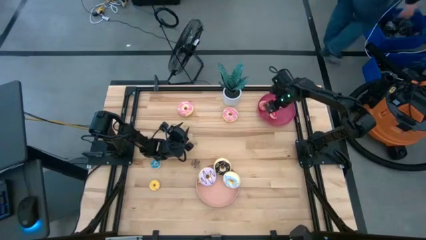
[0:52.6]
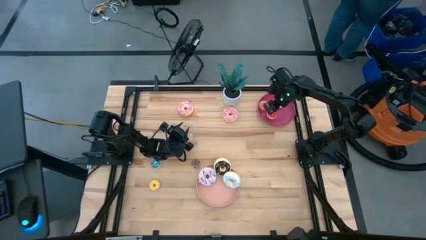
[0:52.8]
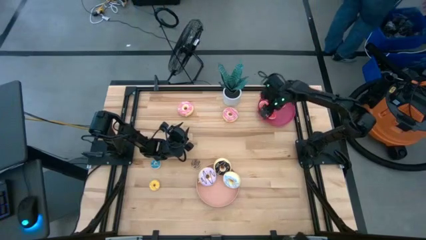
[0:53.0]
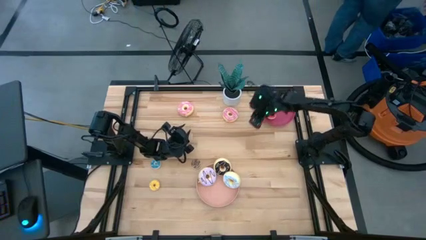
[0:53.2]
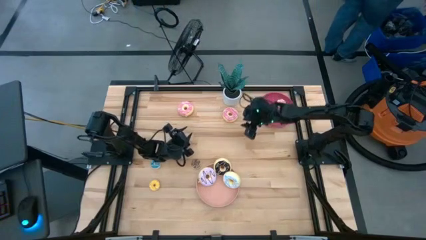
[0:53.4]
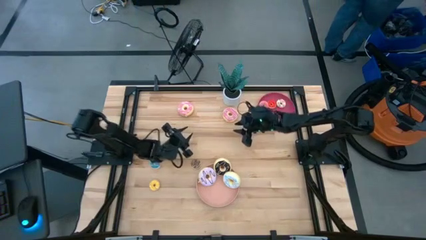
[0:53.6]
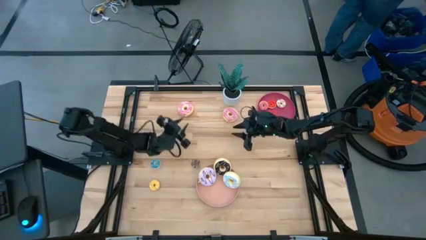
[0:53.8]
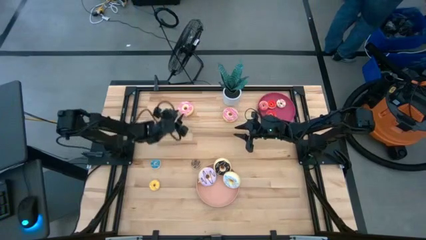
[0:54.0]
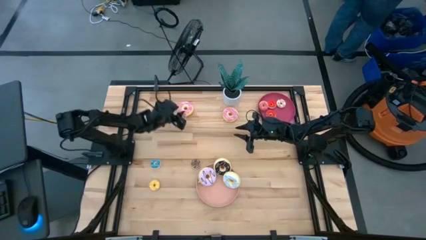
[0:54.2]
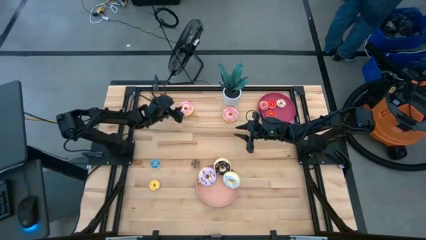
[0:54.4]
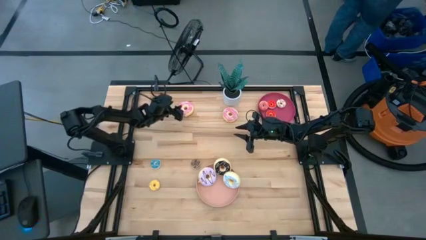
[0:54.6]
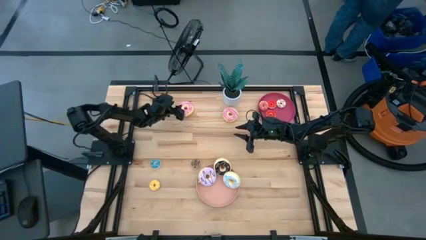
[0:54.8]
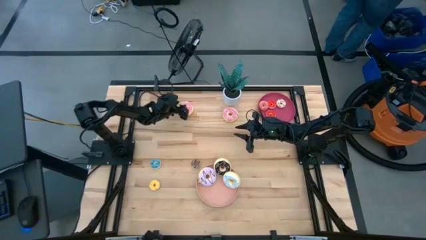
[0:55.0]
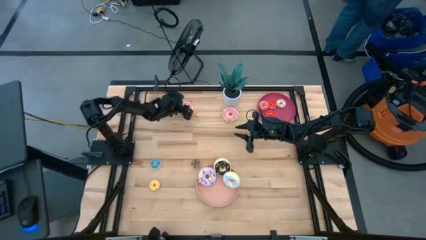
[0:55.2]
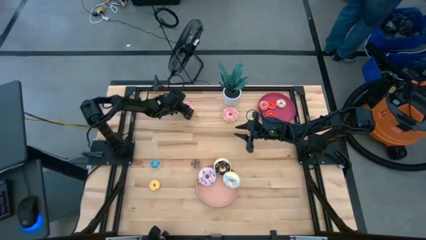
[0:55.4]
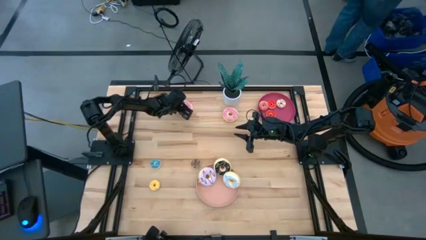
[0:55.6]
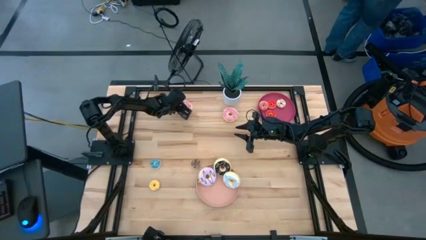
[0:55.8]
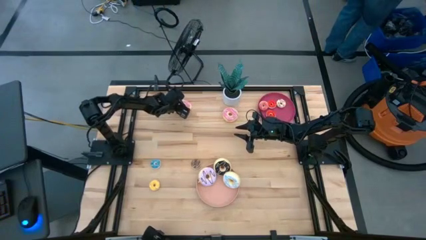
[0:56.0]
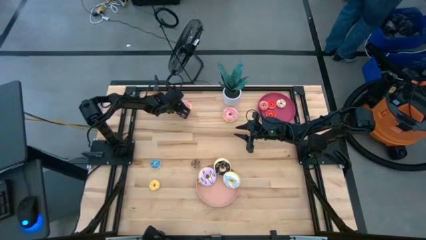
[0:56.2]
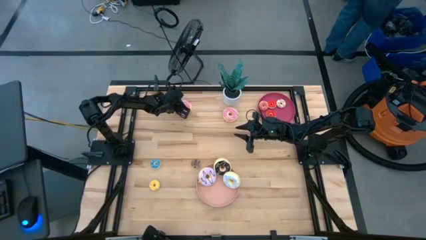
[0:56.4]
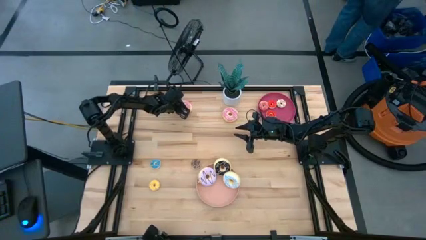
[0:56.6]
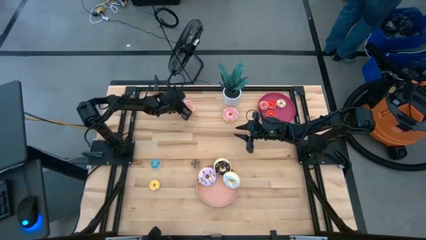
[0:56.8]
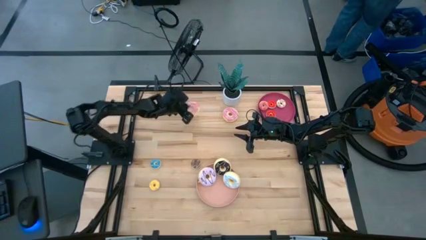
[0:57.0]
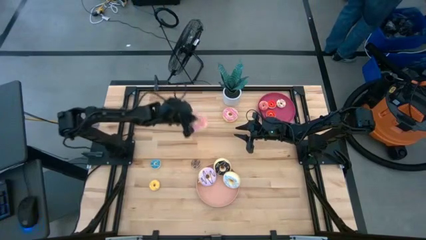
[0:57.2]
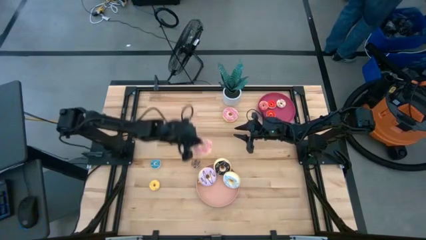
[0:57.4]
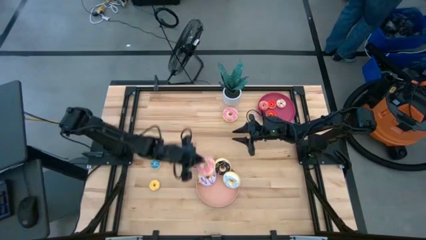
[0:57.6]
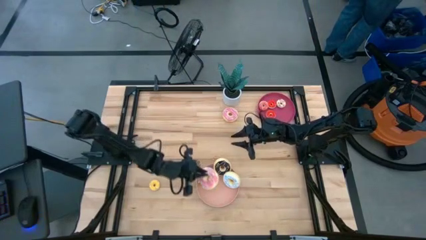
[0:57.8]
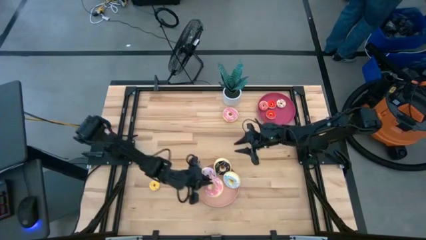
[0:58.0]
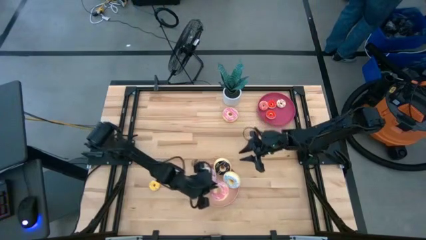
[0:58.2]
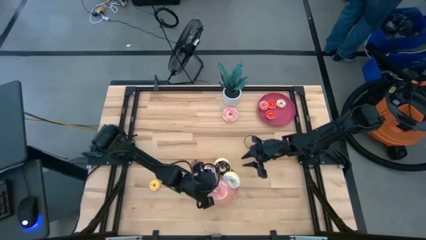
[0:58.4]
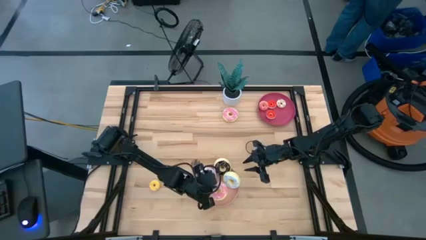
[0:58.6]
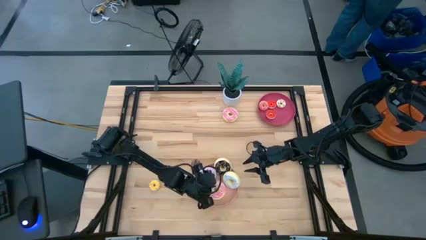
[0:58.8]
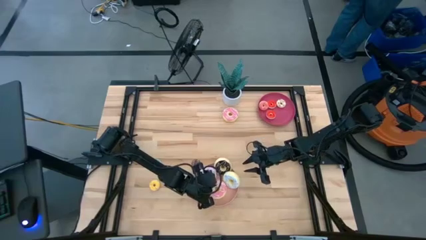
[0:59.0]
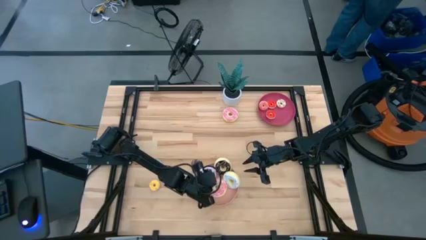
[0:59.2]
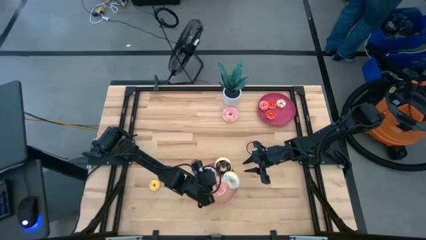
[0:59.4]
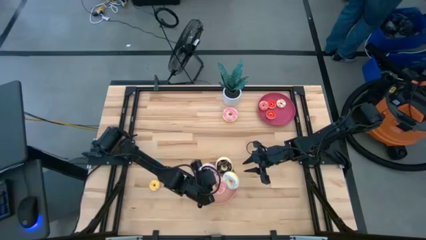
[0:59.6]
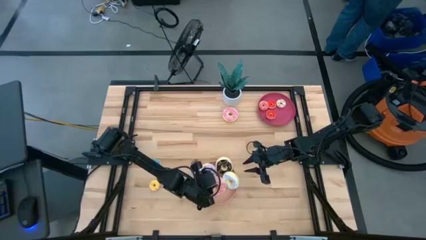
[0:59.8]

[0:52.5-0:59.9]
Task: Pick & Place donuts
Put the large pink donut on the pink plate

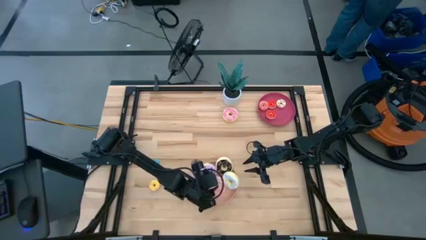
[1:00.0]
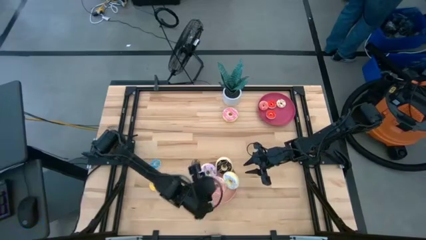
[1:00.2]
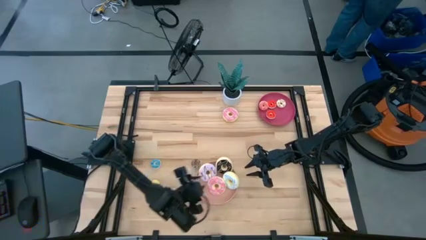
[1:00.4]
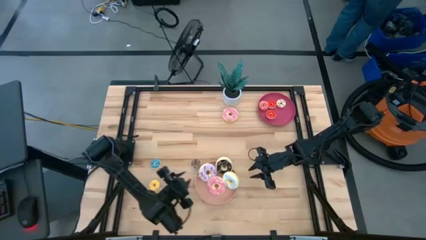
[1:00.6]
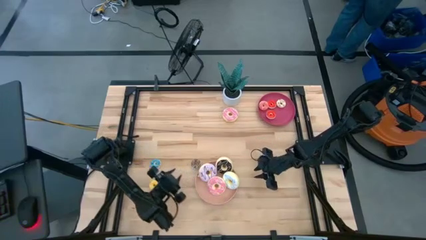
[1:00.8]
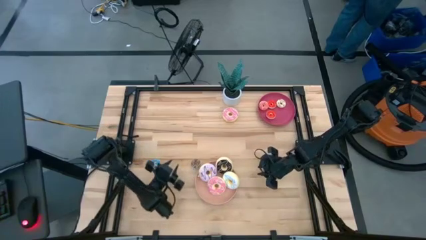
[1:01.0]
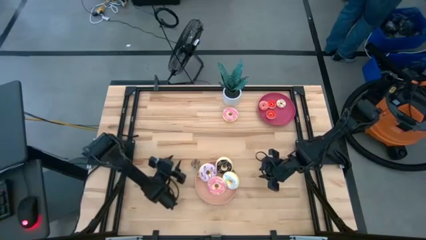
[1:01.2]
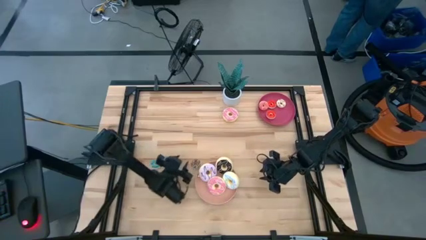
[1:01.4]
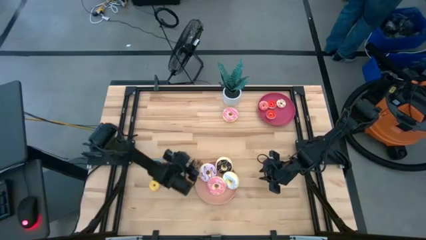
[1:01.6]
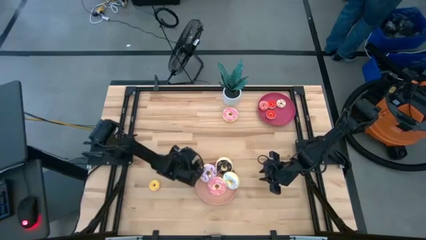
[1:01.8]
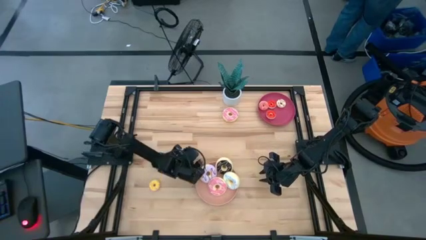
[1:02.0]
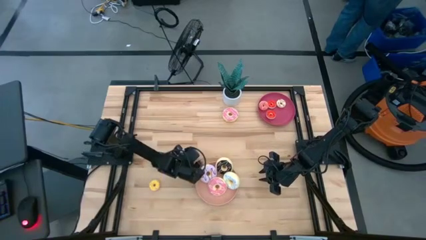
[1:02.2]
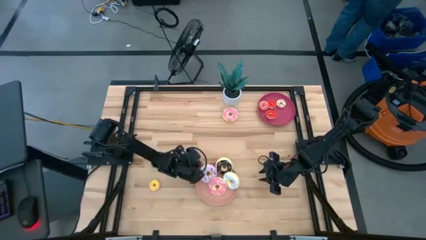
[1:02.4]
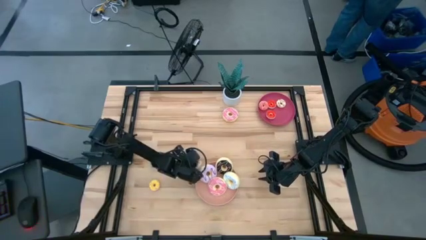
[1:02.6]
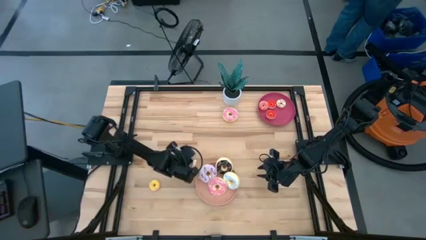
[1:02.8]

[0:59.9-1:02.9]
Put the small brown donut on the red plate

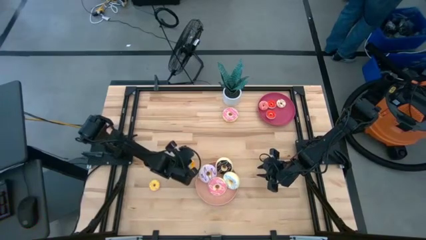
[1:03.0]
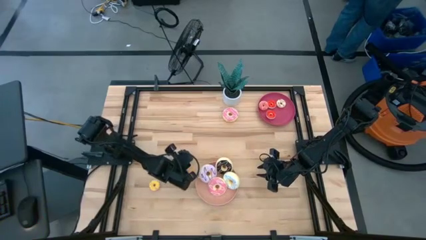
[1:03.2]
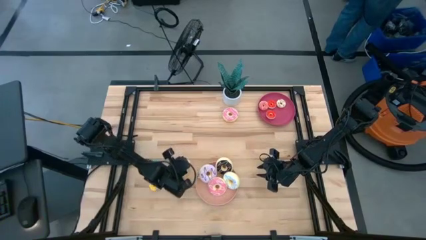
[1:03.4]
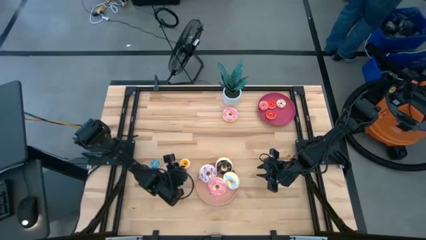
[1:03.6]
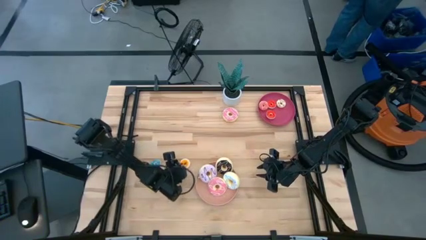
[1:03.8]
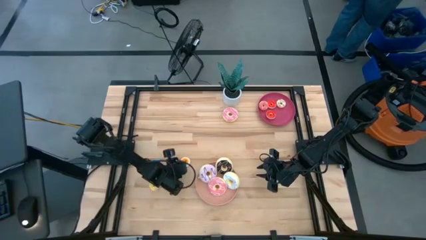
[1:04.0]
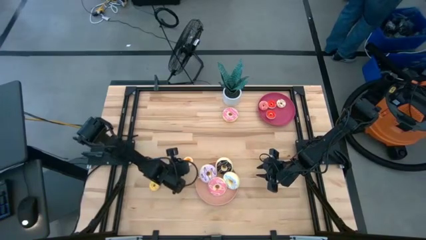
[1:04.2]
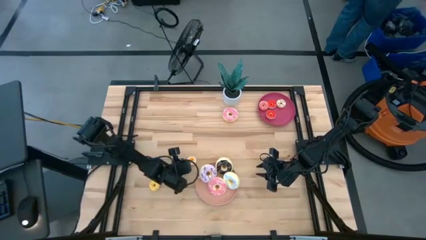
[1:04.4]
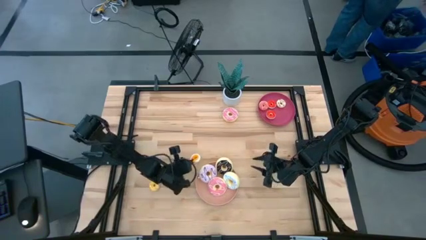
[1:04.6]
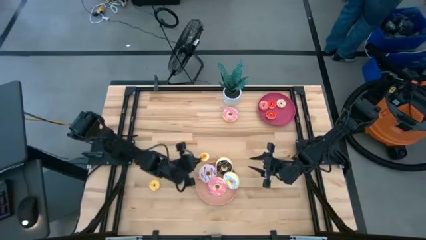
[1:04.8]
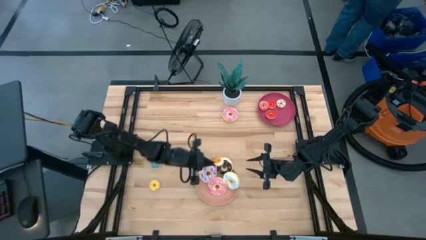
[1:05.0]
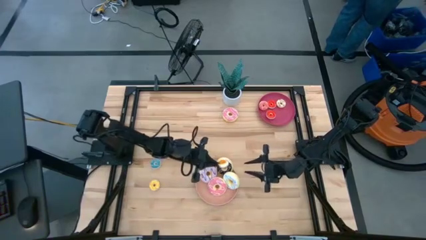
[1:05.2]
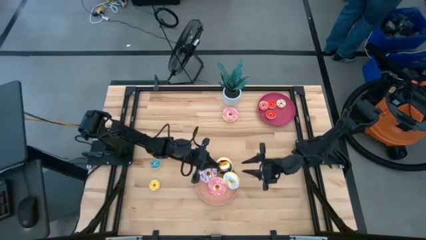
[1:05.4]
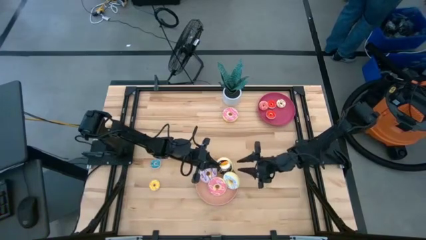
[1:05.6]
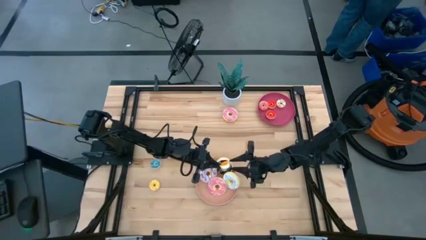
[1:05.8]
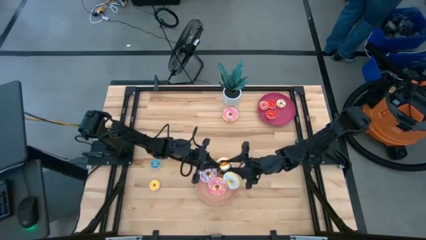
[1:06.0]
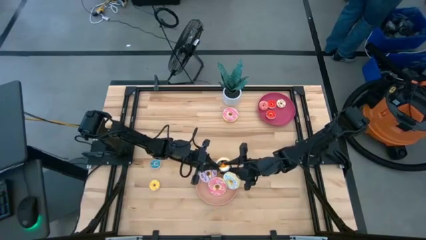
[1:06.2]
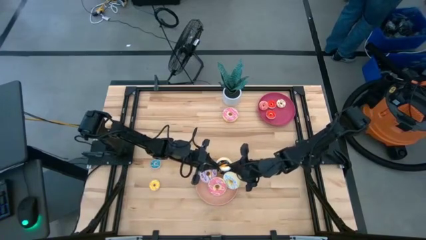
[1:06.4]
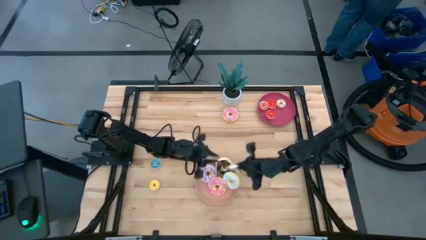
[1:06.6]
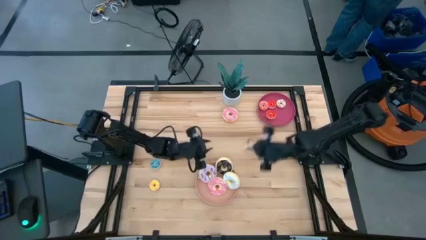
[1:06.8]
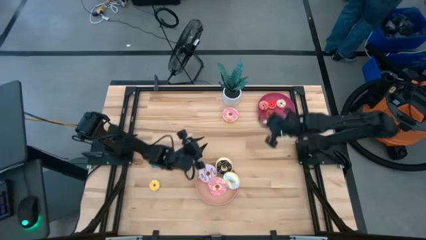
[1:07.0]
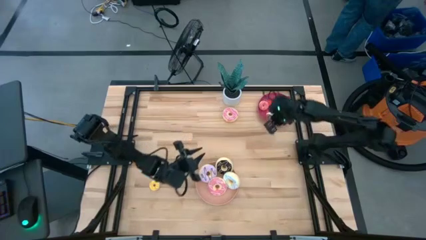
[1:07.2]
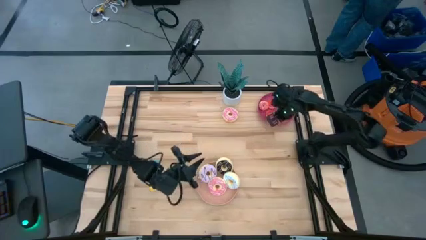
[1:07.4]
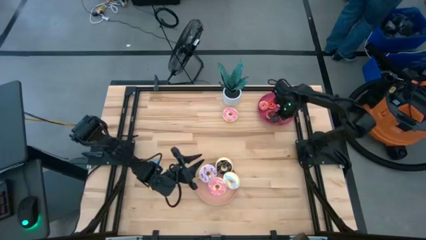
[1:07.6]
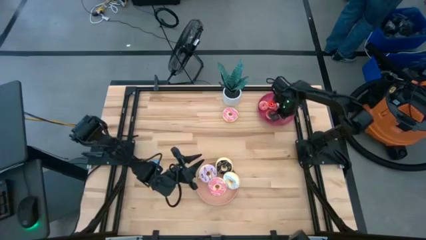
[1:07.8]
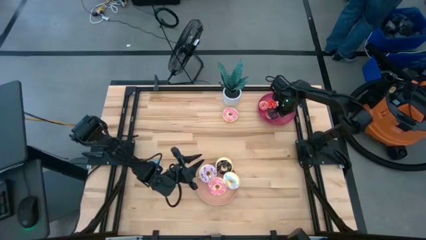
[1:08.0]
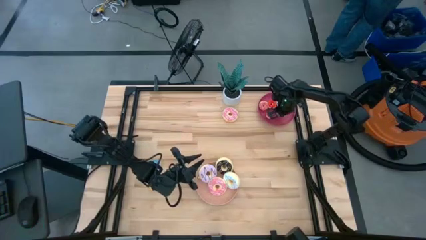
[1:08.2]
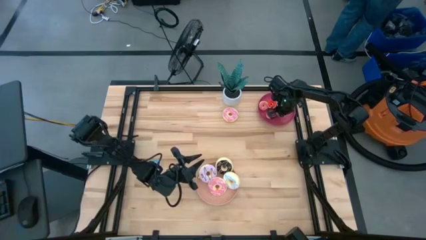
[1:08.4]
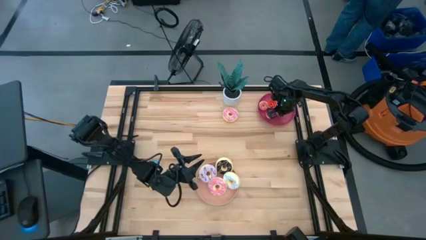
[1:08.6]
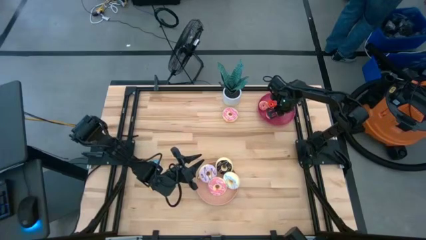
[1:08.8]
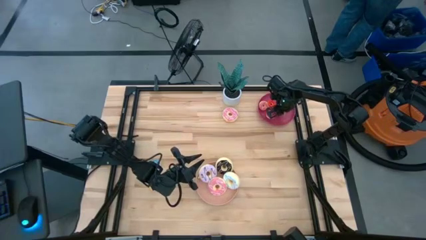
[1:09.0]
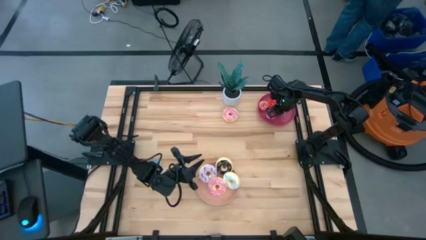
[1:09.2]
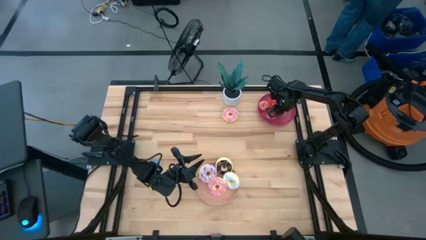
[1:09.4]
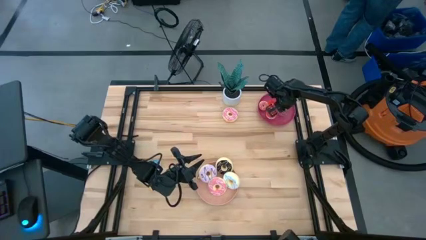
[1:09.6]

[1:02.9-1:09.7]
Put the small brown donut on the red plate
